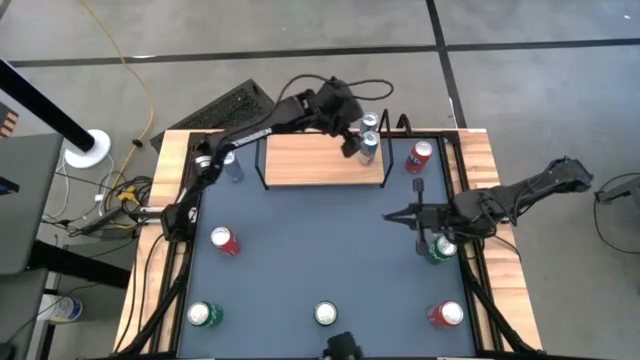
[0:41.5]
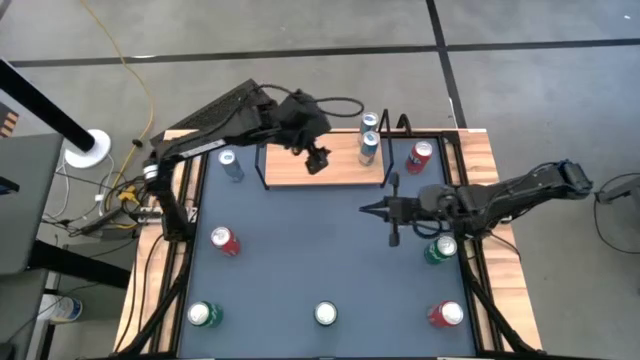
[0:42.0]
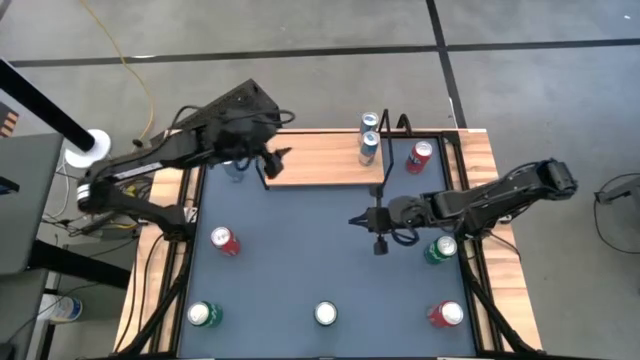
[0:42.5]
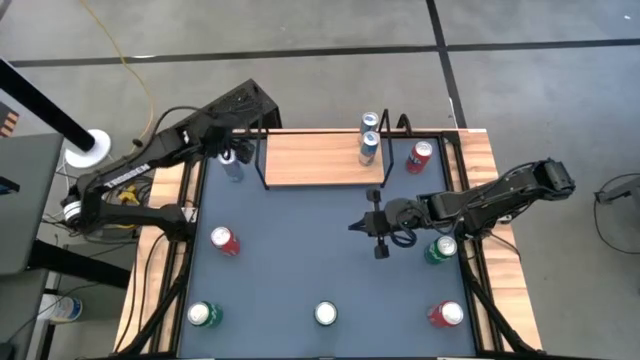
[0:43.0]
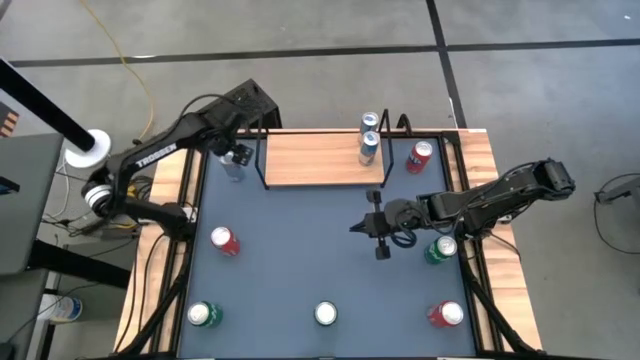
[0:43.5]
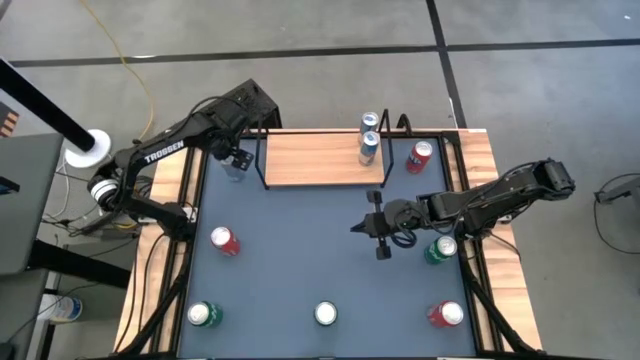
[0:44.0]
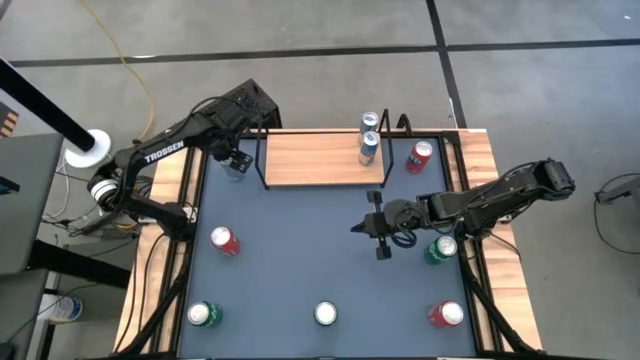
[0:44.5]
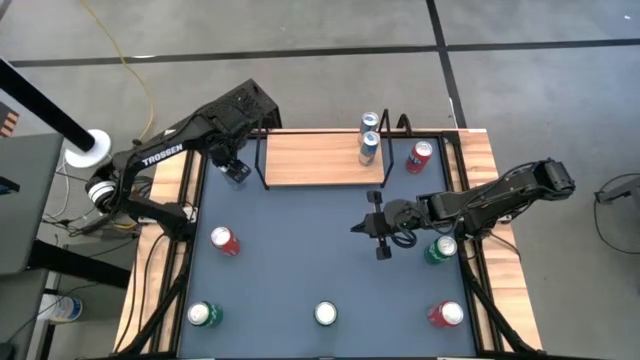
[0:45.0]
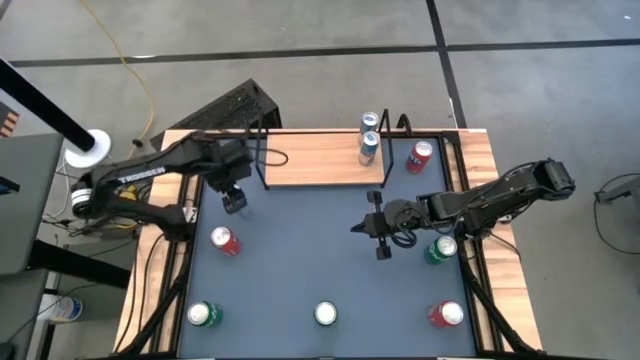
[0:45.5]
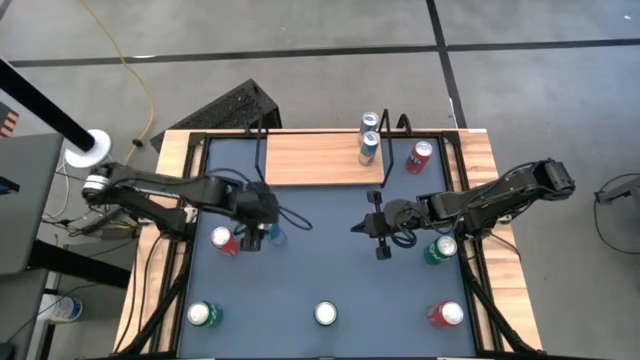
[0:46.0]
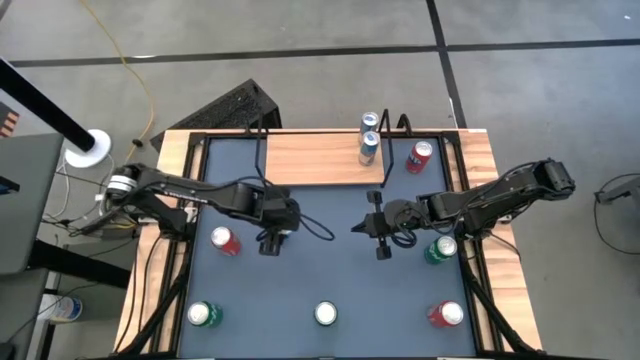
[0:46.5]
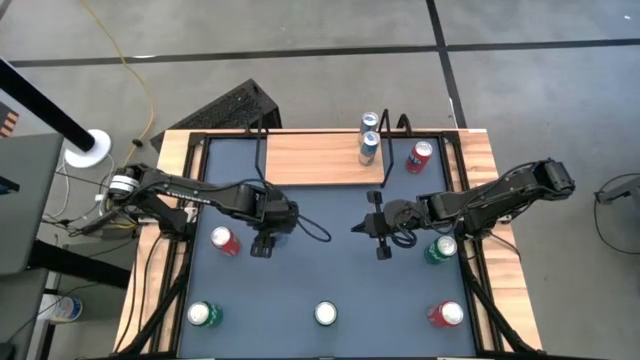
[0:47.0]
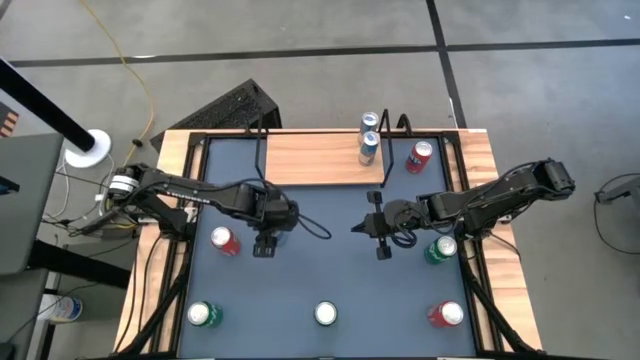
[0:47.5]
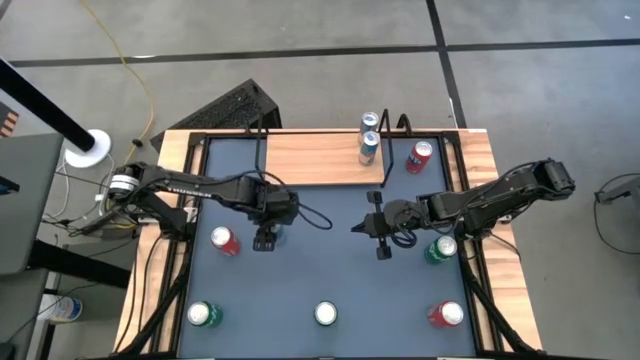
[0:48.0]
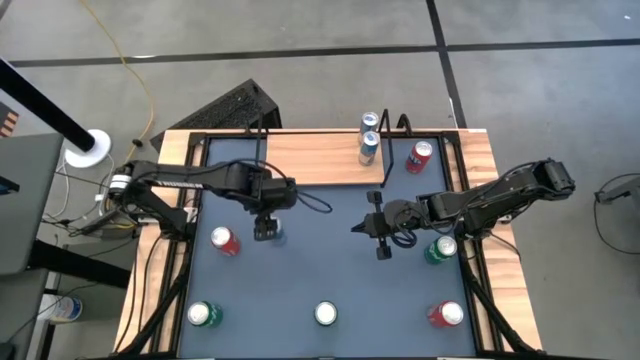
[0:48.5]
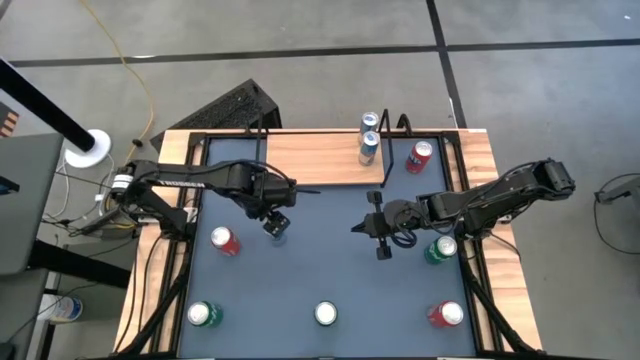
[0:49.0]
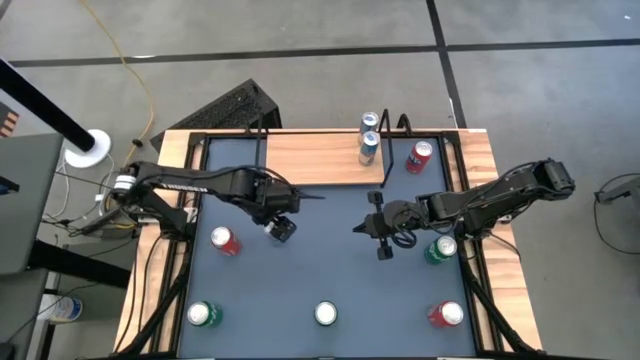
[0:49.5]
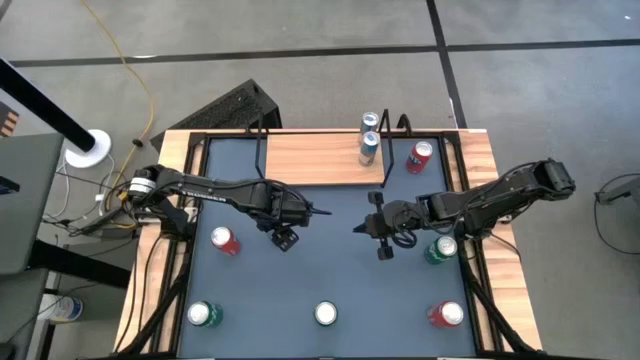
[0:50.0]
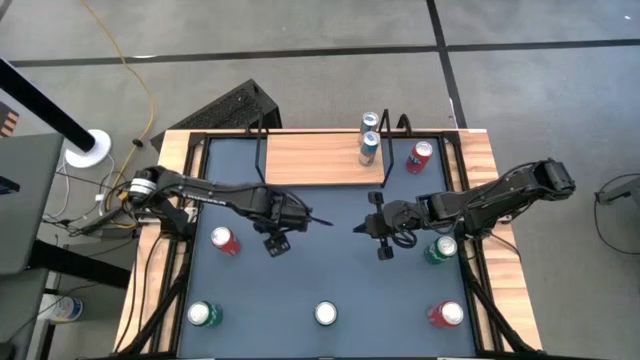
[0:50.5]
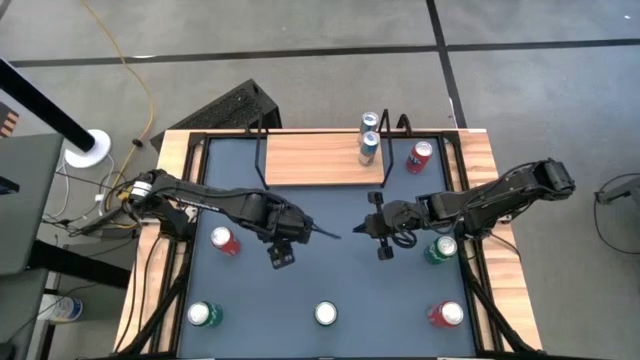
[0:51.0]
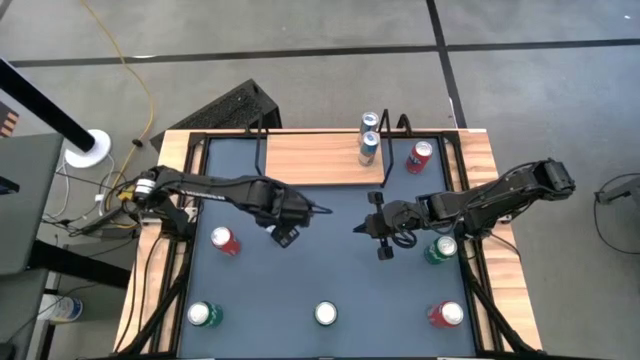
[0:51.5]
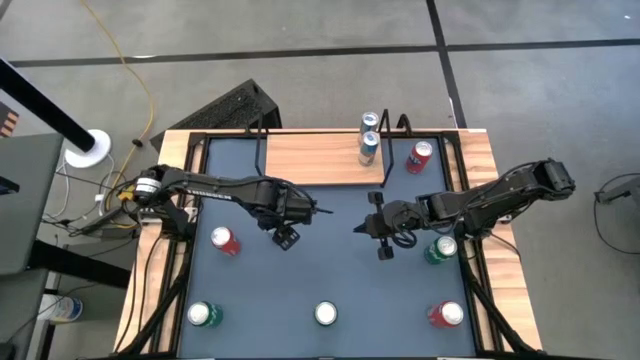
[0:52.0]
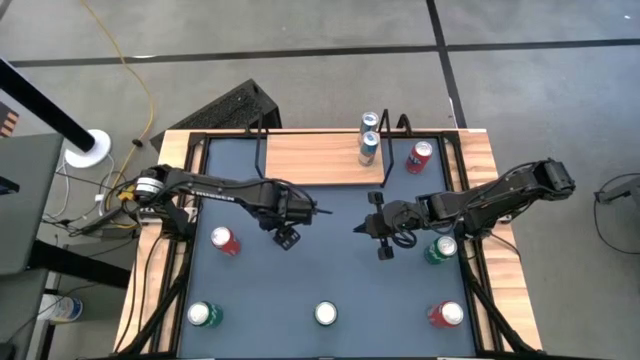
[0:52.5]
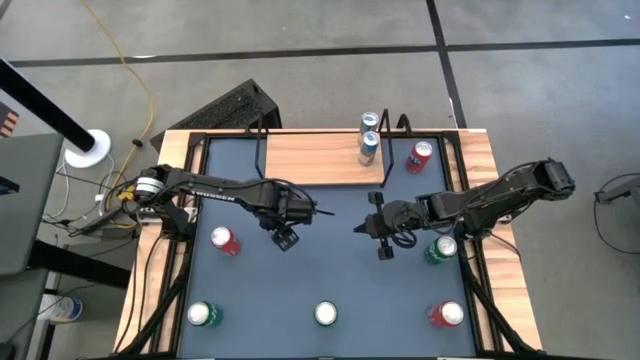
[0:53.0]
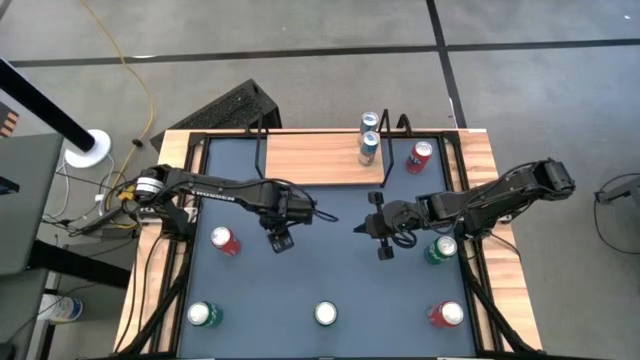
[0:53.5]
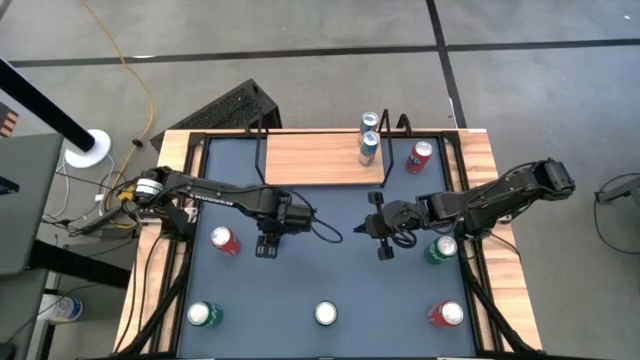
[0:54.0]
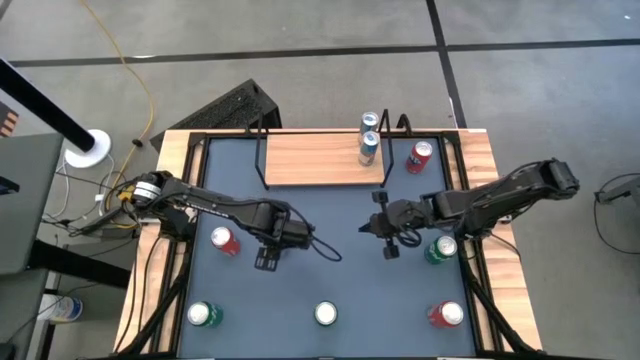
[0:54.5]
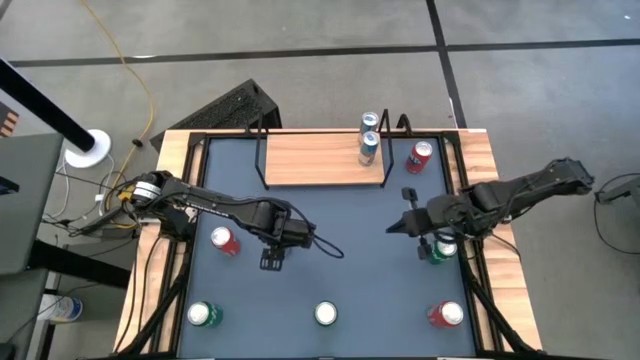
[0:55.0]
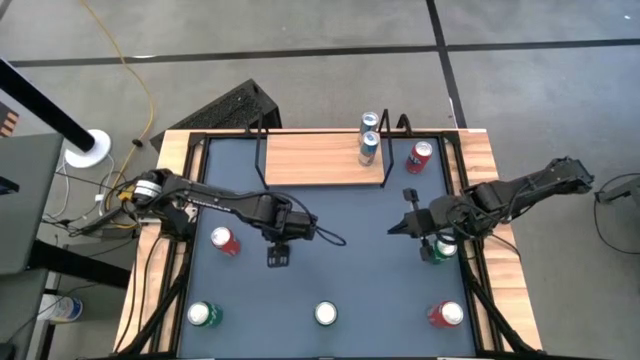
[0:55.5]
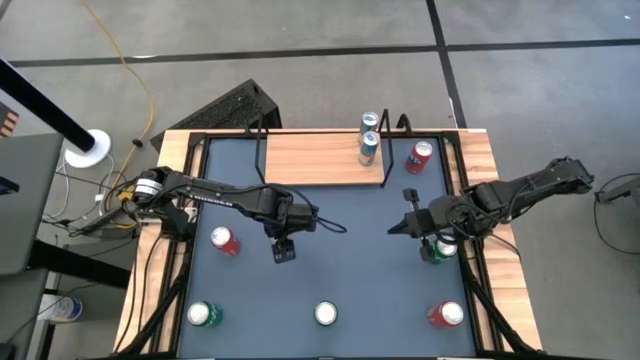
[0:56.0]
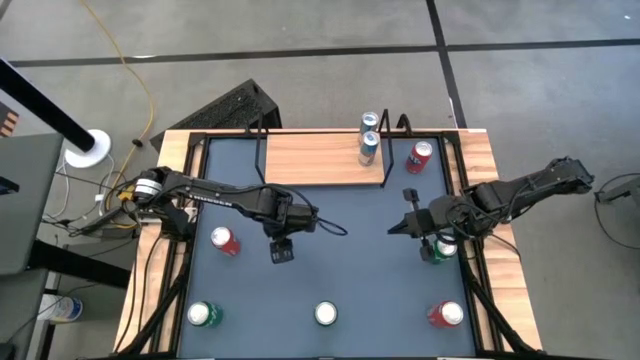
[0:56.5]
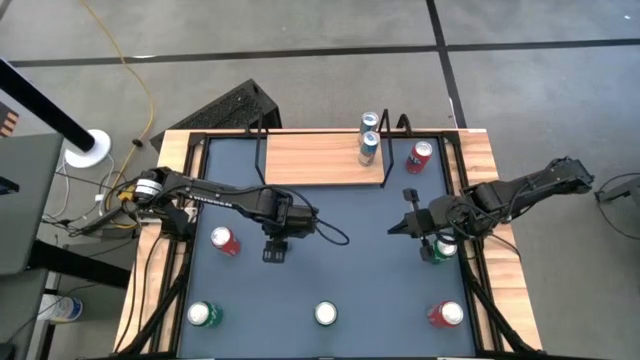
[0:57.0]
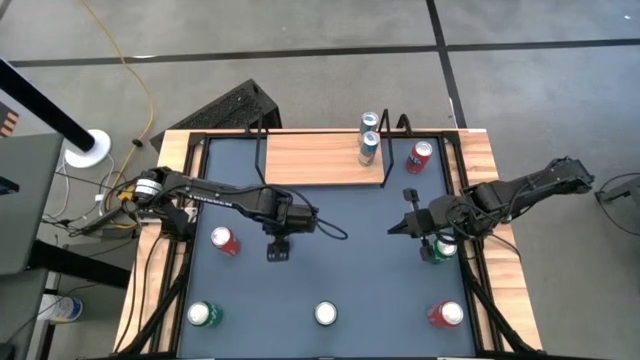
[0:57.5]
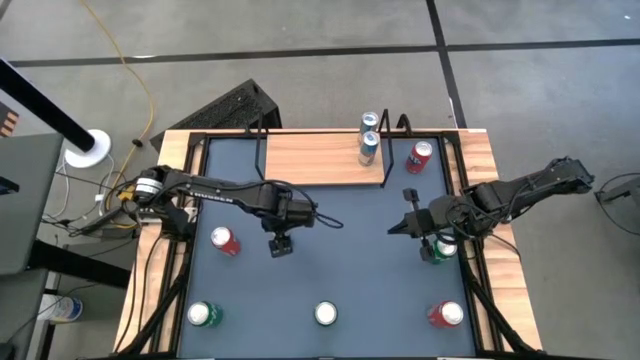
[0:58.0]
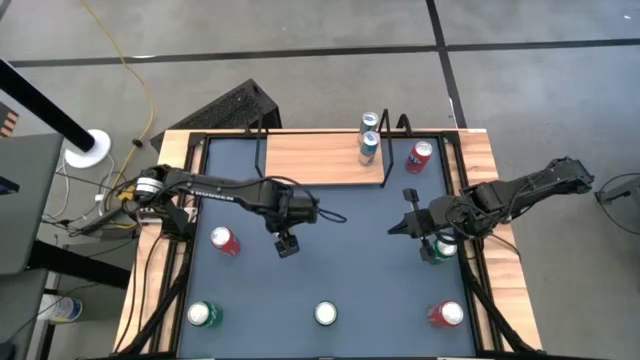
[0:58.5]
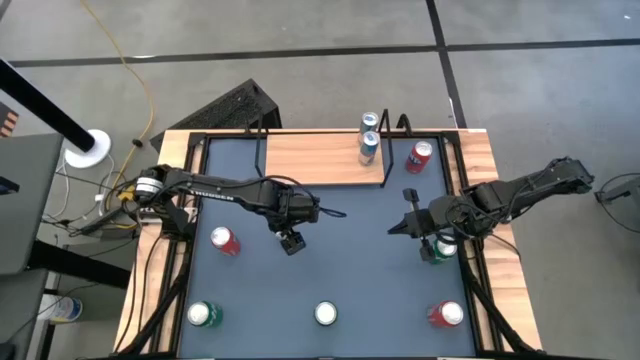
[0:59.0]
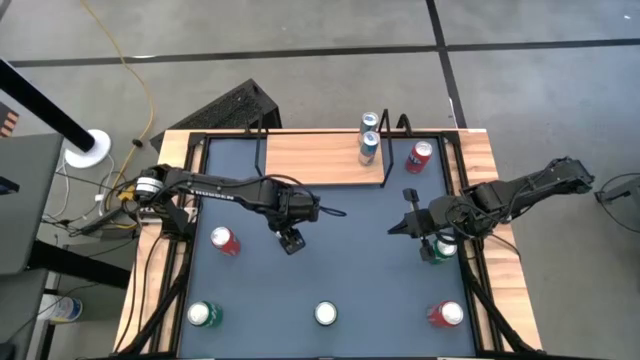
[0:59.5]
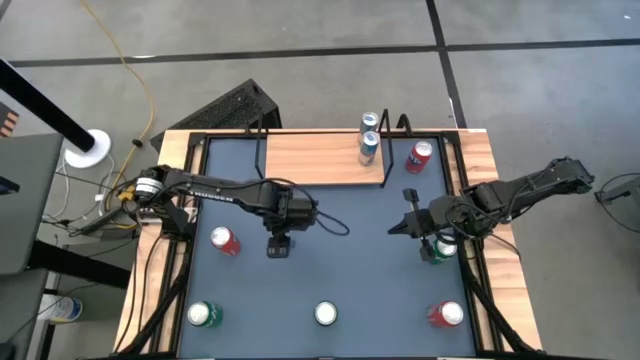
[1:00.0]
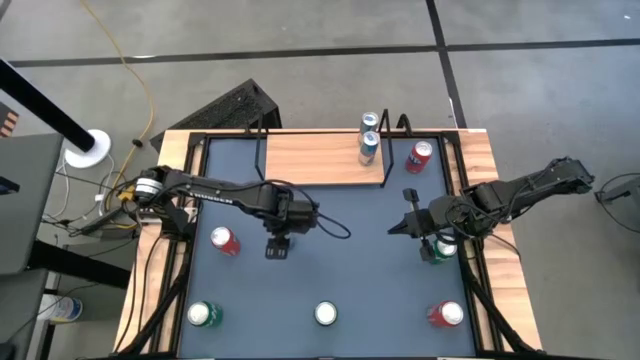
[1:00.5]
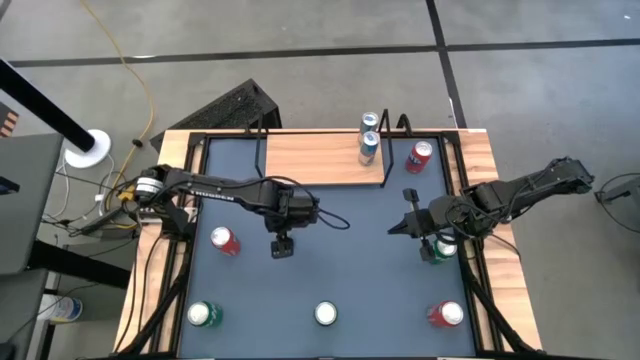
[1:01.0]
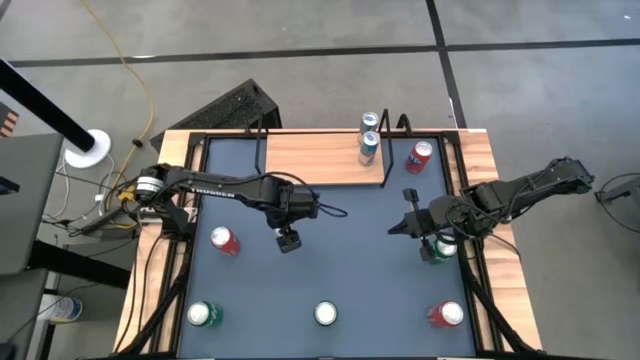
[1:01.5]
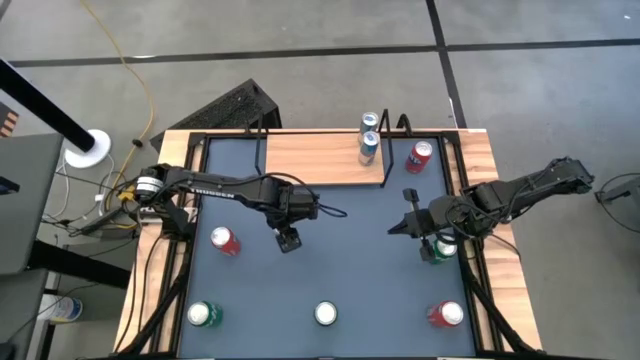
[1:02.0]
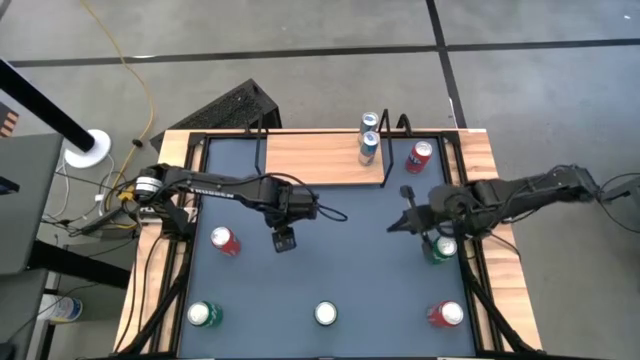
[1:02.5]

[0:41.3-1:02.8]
Task: Place canned beverage on shelf
Put the blue soda can on the shelf aligned with the other blue soda can
